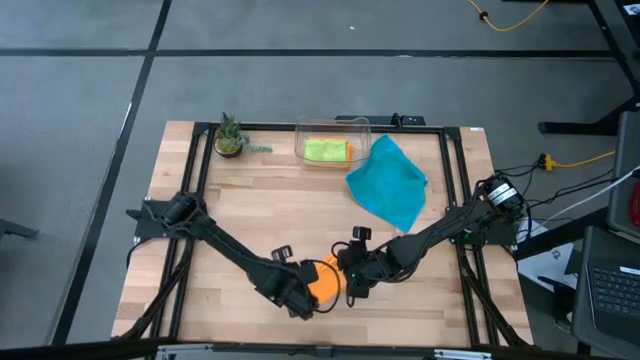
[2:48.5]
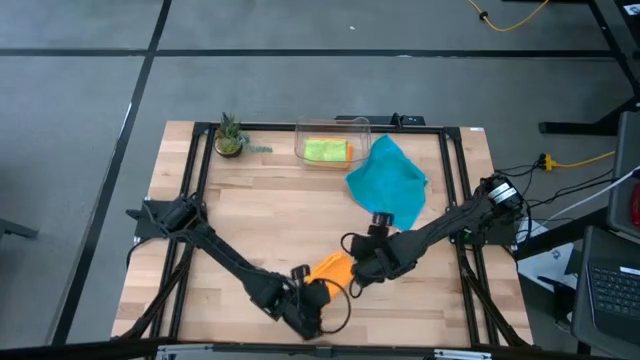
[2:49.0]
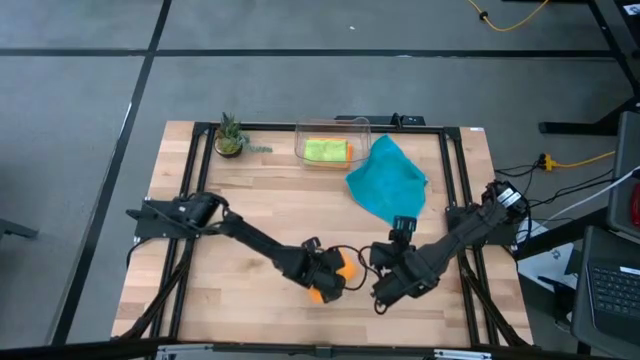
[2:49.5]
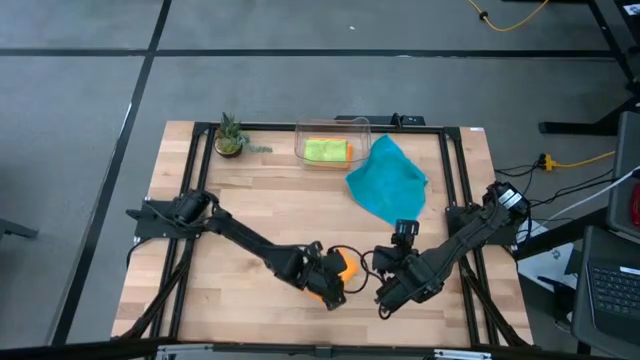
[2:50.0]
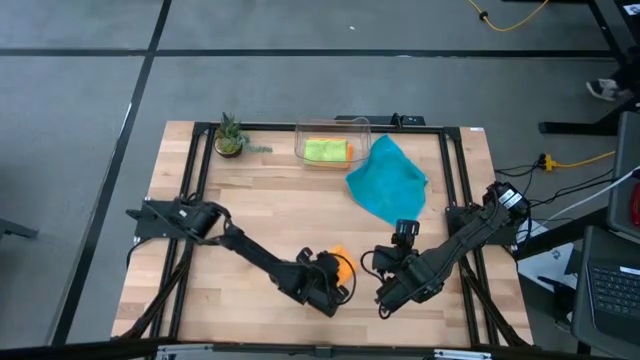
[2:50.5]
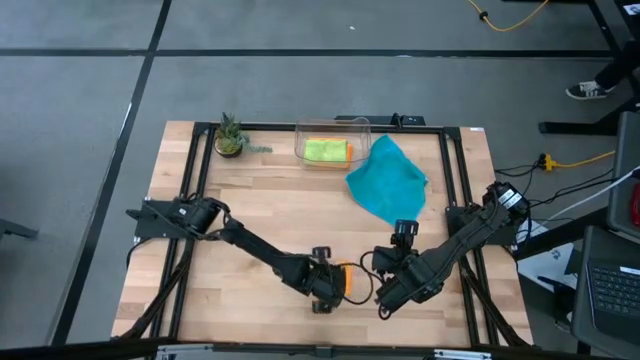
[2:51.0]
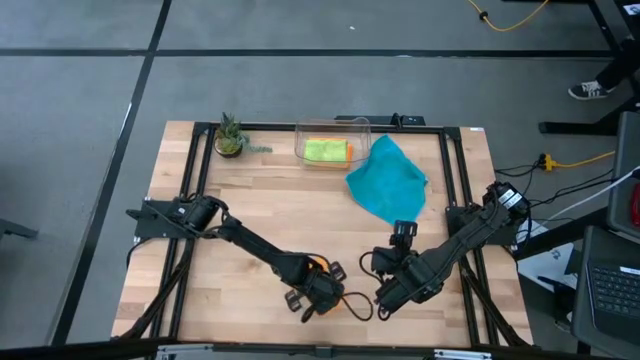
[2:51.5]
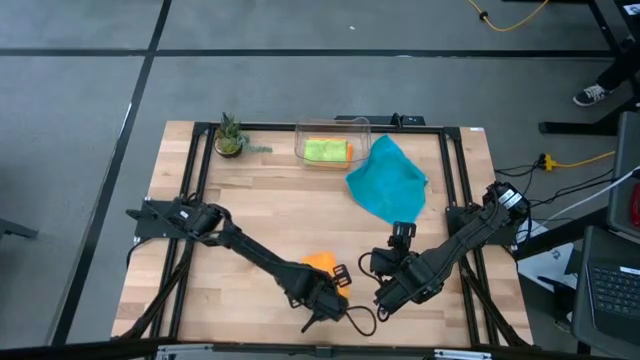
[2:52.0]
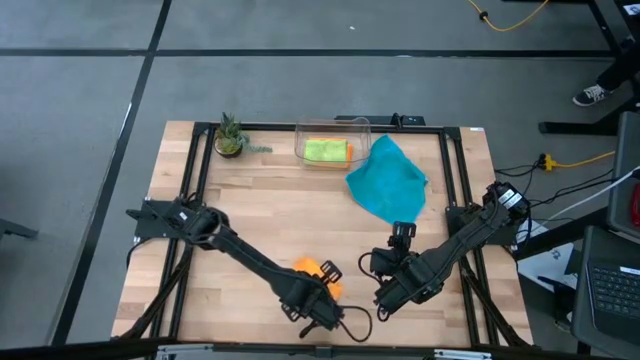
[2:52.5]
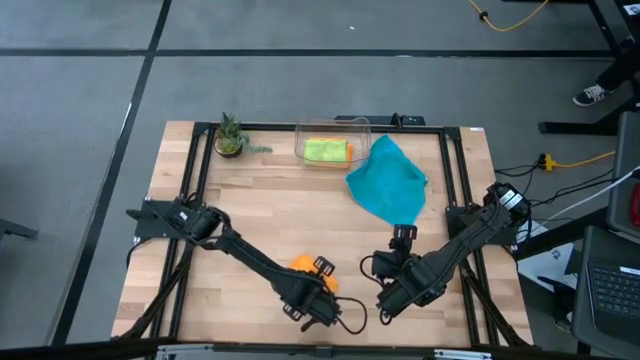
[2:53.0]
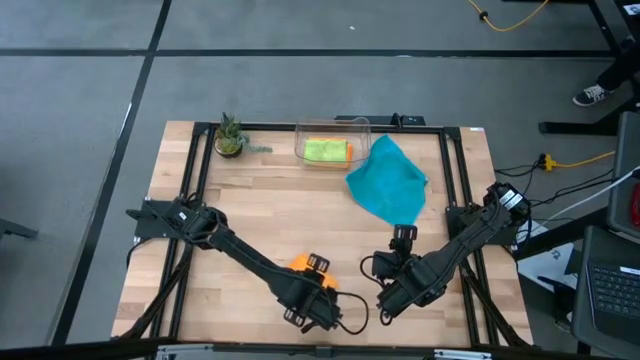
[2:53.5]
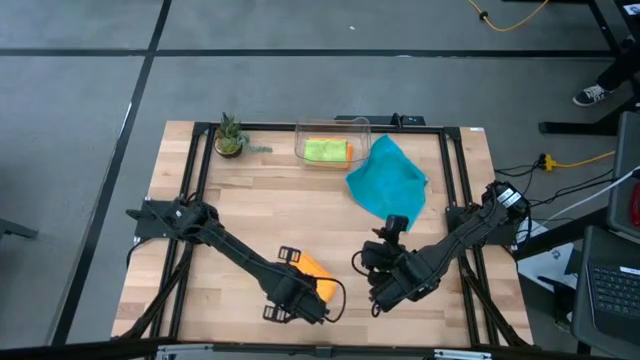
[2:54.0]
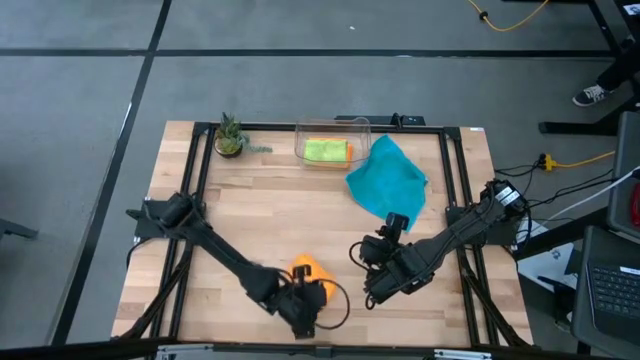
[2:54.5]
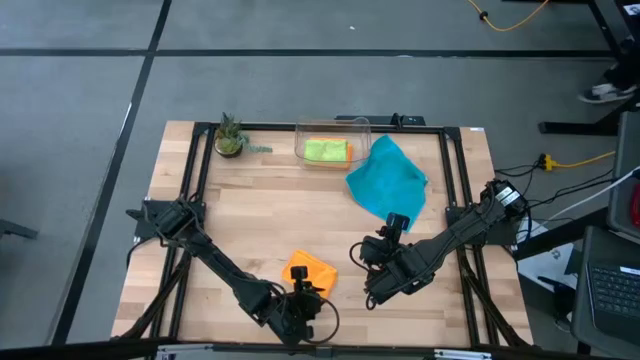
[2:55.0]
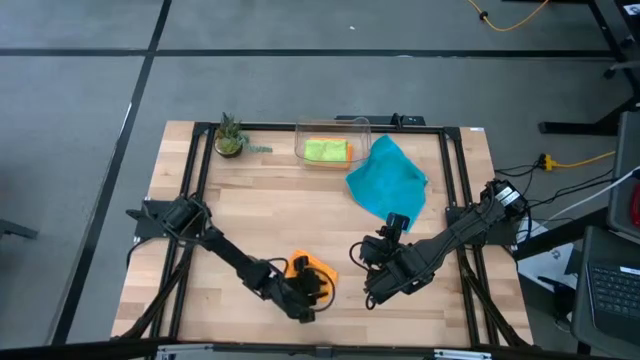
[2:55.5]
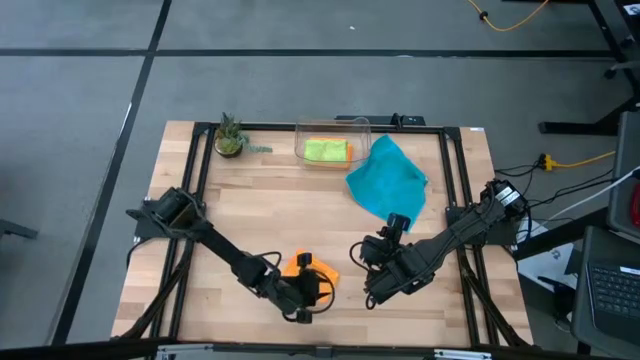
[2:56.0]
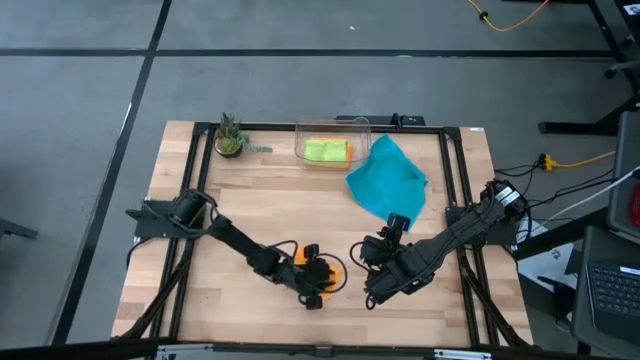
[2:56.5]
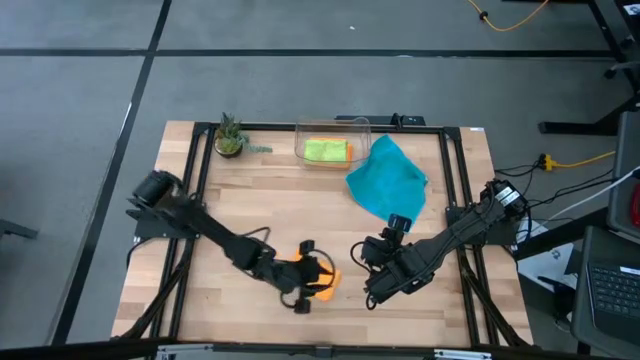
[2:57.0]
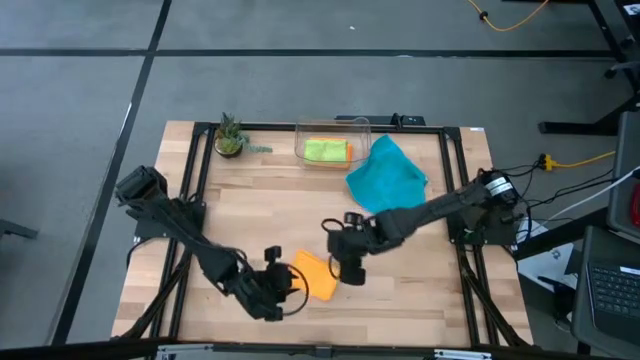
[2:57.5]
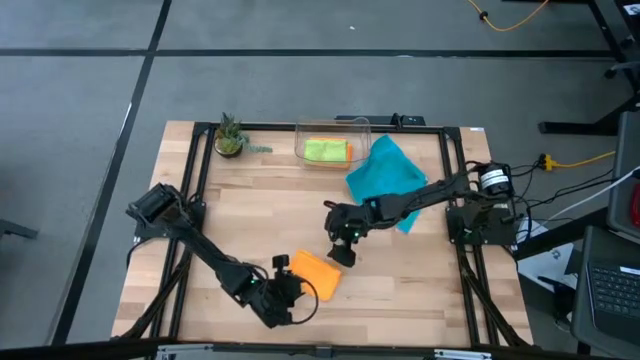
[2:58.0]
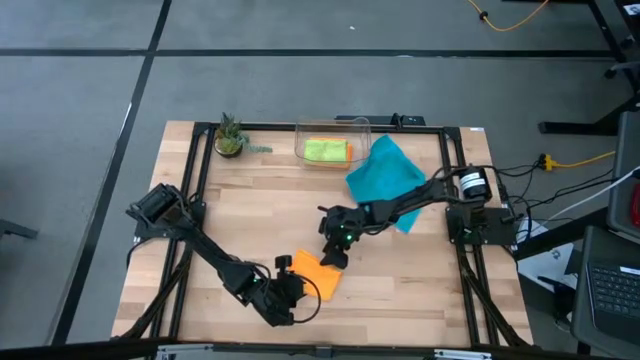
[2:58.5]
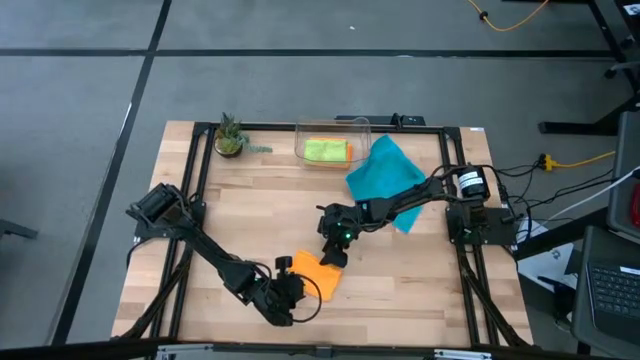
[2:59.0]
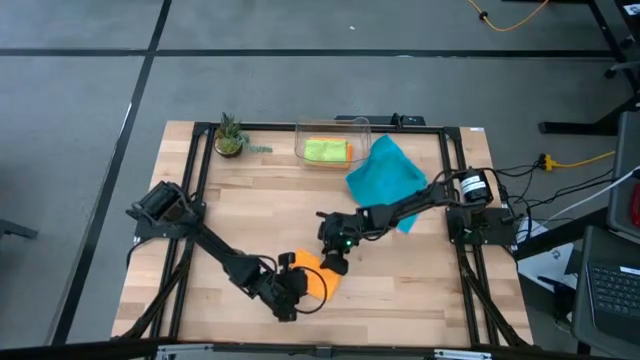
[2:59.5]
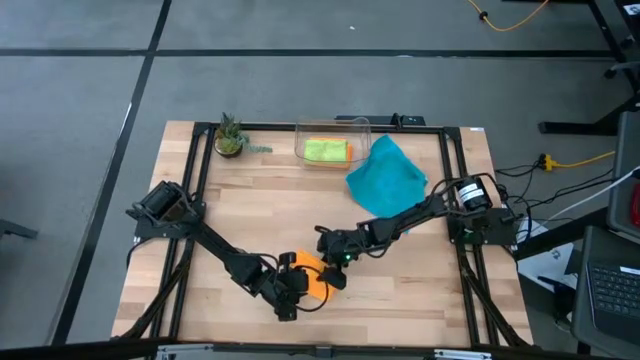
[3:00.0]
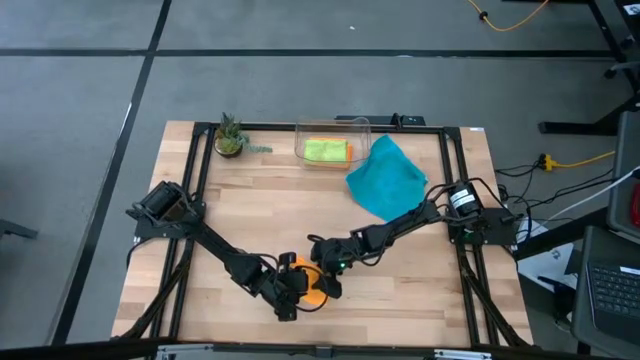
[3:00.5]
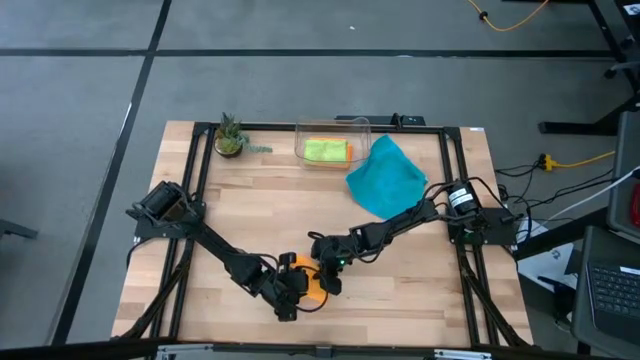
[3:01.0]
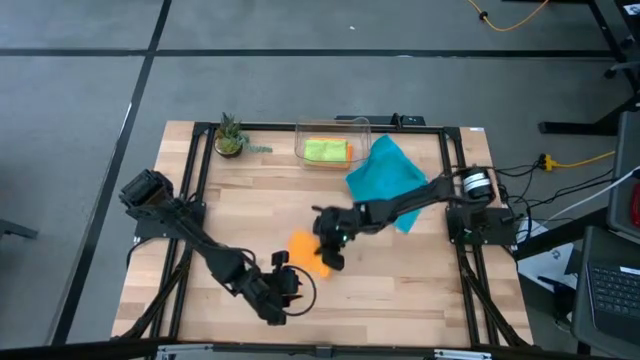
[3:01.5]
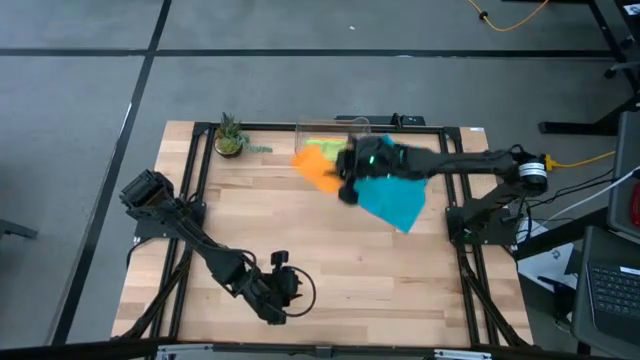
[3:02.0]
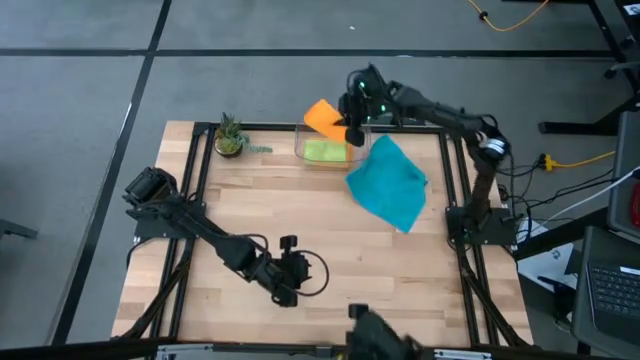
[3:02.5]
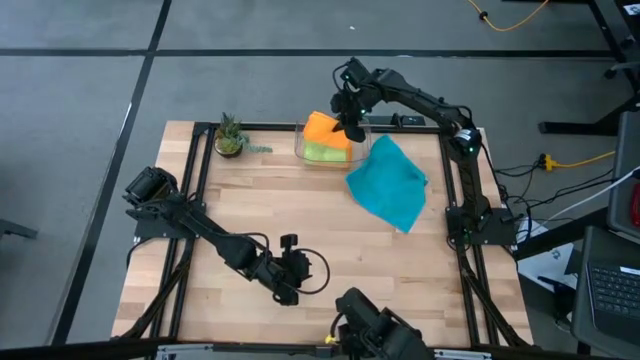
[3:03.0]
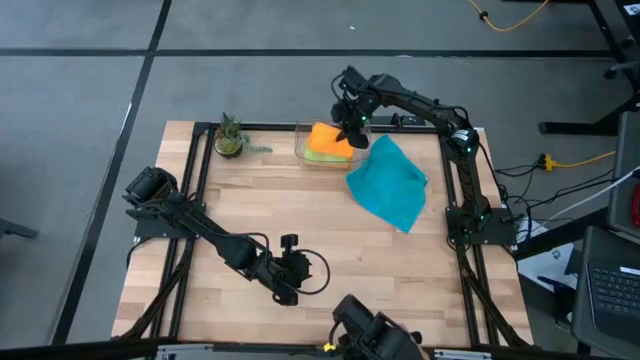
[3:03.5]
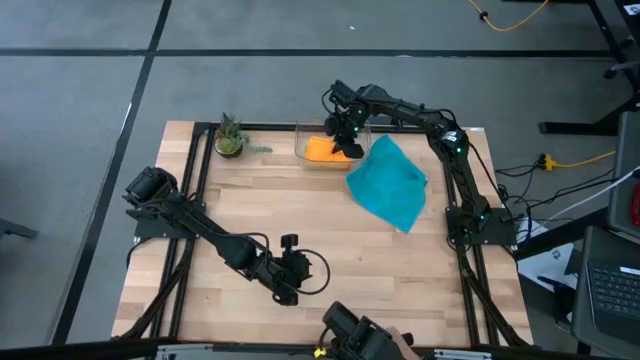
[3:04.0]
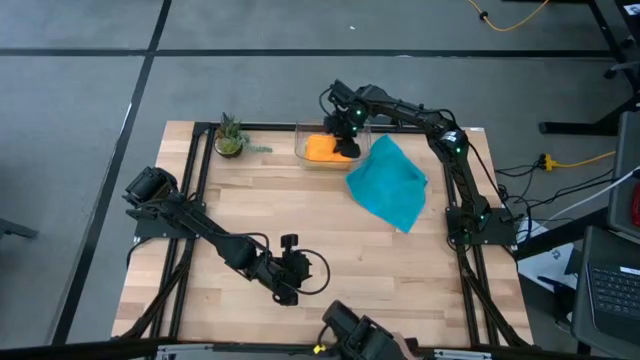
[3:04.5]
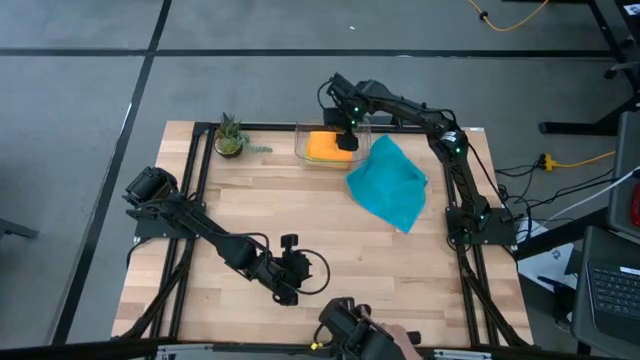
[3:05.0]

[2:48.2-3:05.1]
Task: Fold microfiber towels
Put the folded orange microfiber cloth into the transparent bin

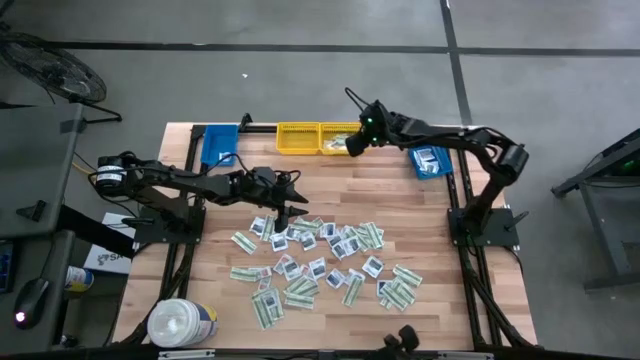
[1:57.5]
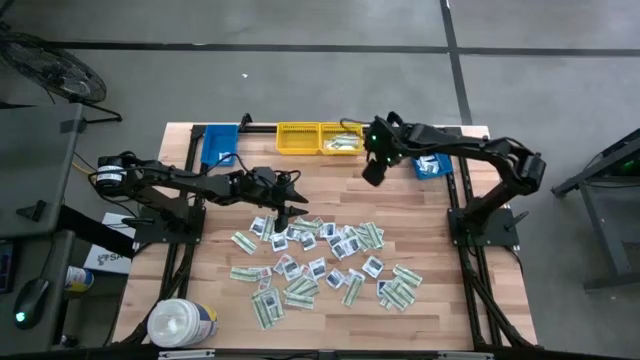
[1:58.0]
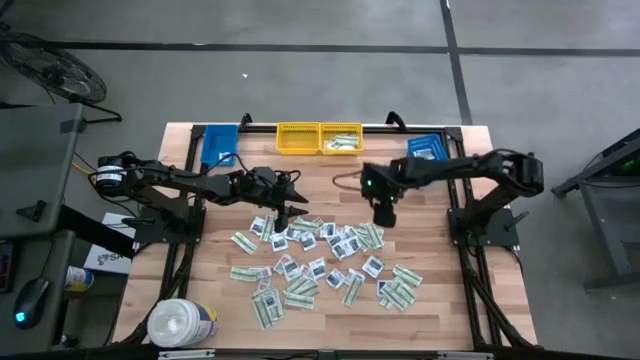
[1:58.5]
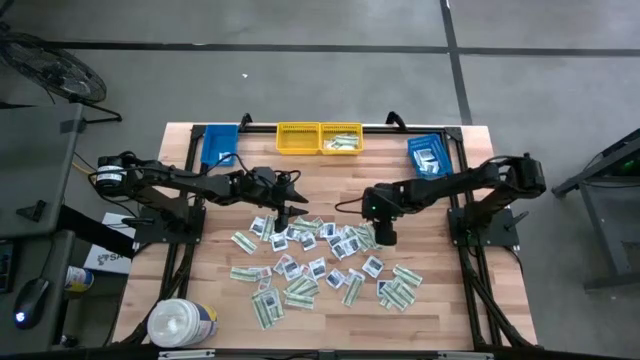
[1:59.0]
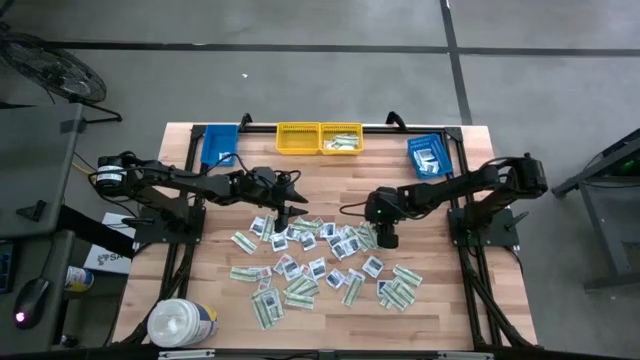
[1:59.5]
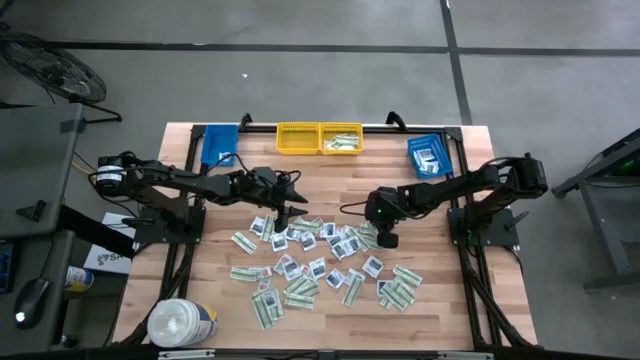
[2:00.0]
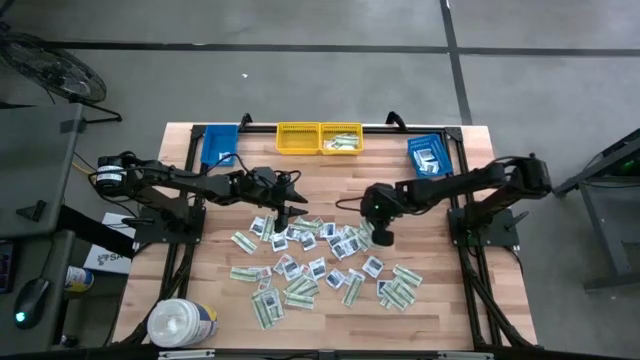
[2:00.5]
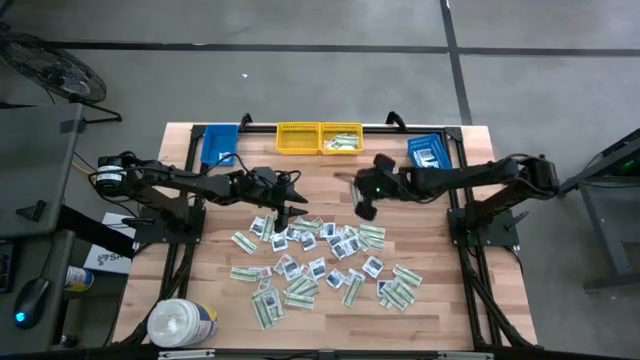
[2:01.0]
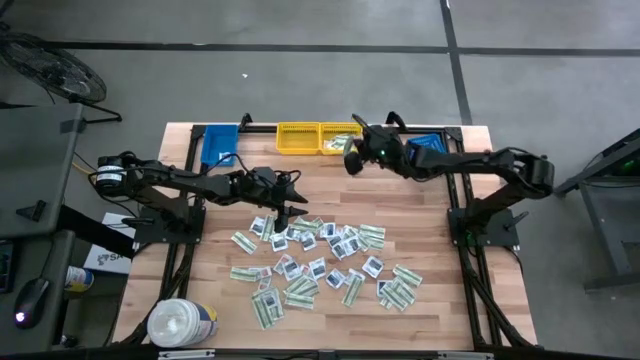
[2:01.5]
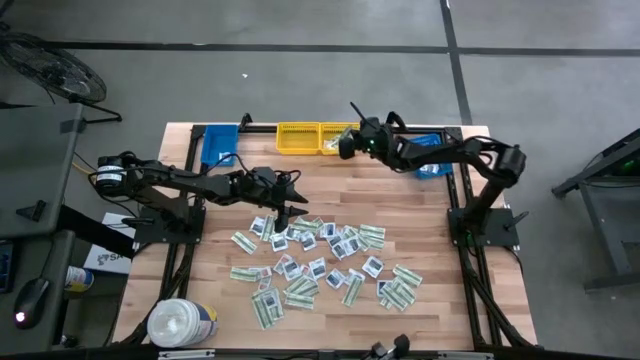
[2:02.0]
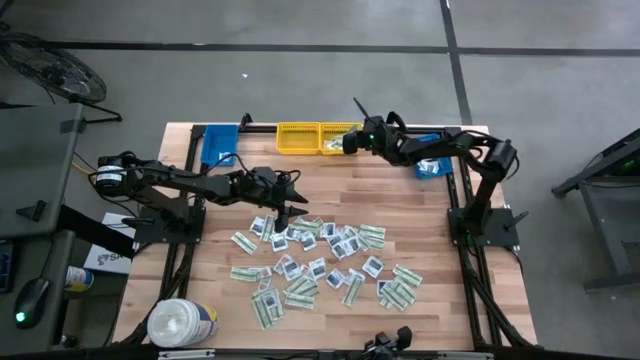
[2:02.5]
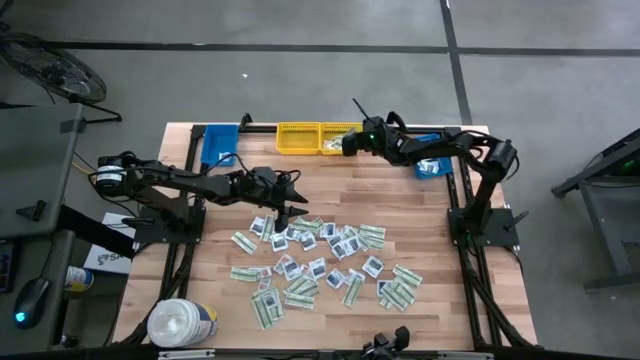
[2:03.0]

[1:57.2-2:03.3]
Task: Pick & Place First Aid Supplies
Put the green bandage pack into the right yellow bin
